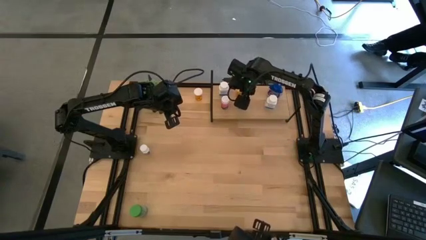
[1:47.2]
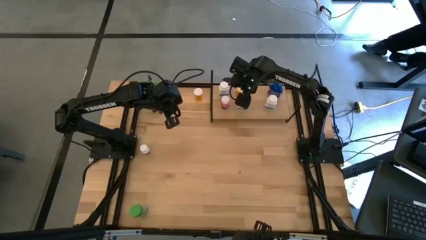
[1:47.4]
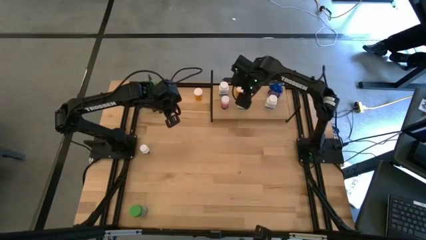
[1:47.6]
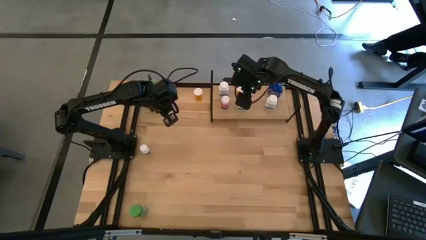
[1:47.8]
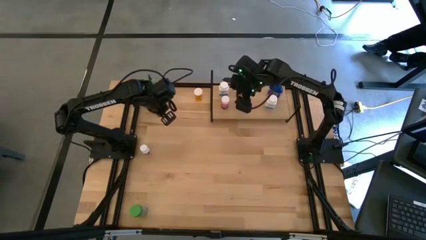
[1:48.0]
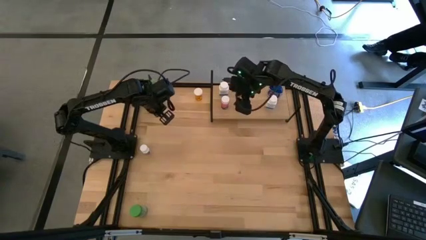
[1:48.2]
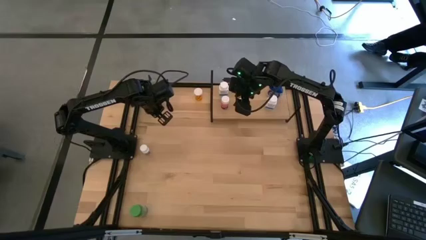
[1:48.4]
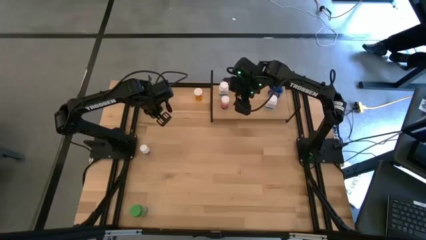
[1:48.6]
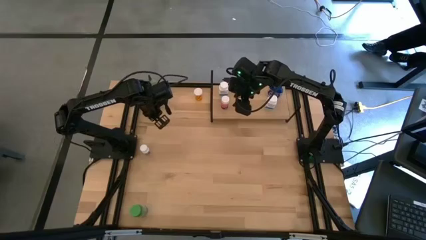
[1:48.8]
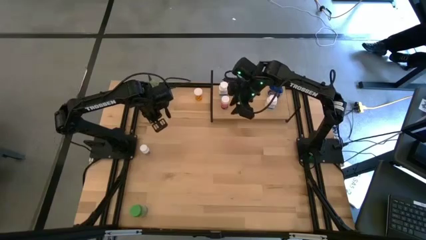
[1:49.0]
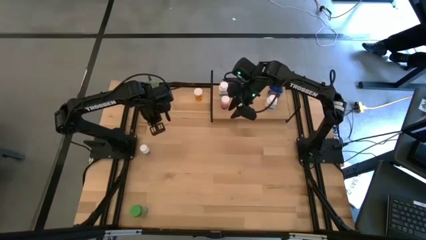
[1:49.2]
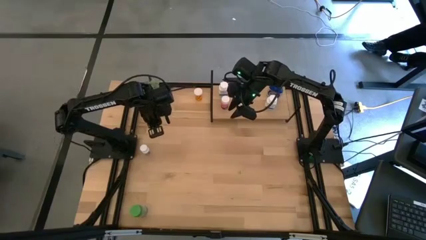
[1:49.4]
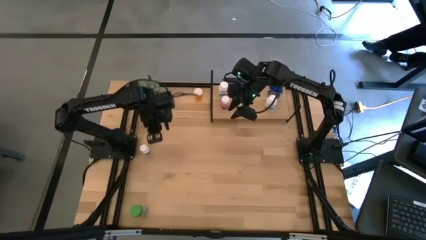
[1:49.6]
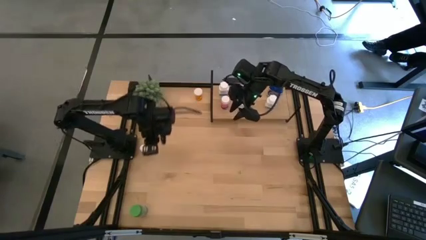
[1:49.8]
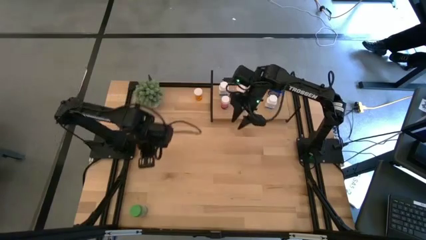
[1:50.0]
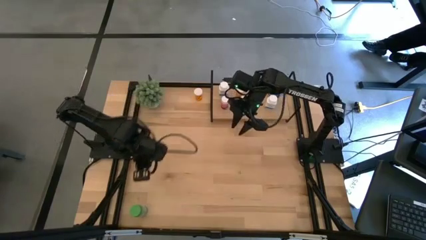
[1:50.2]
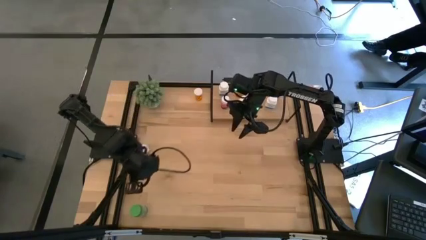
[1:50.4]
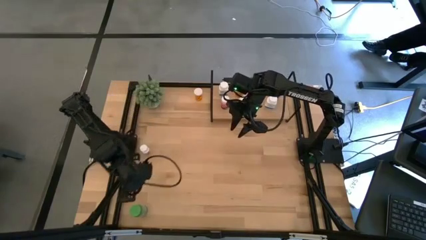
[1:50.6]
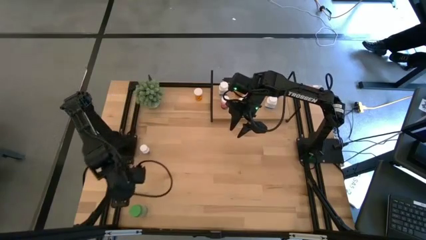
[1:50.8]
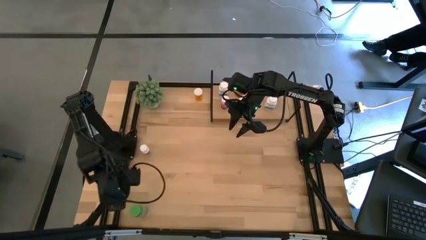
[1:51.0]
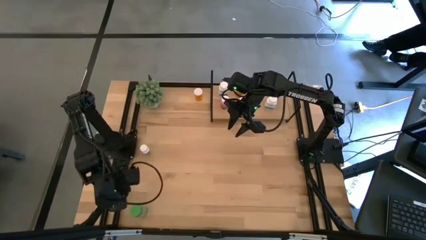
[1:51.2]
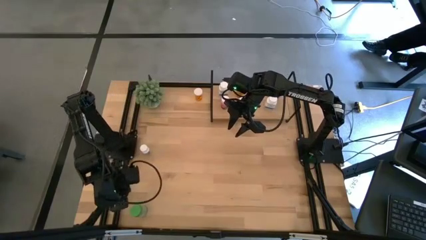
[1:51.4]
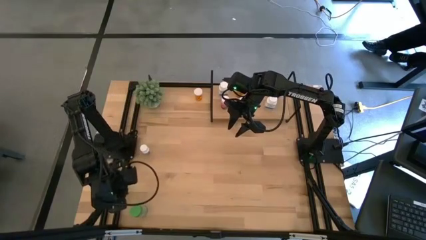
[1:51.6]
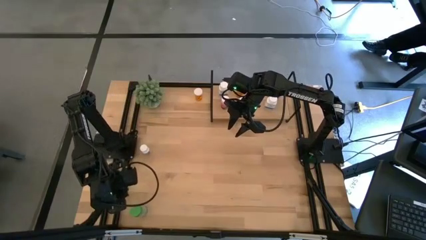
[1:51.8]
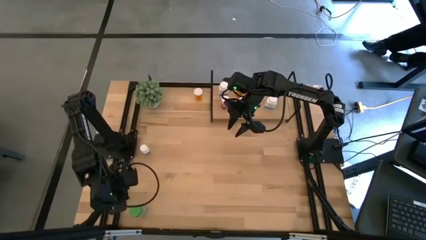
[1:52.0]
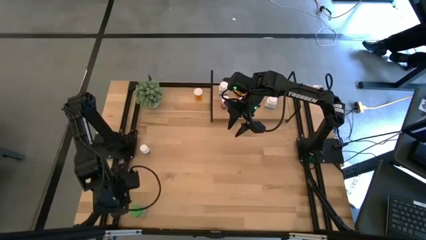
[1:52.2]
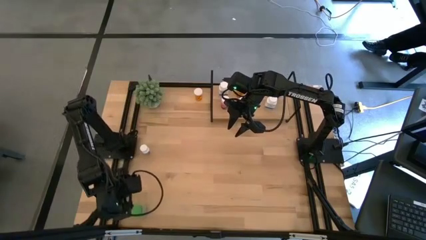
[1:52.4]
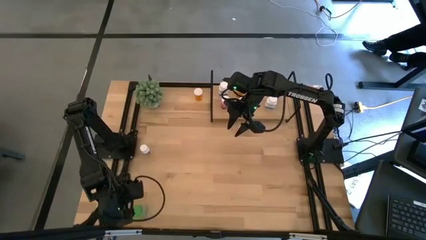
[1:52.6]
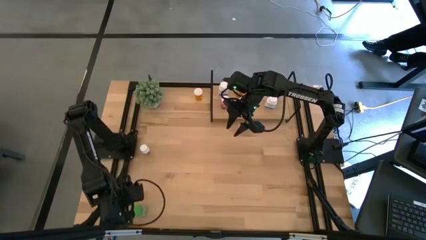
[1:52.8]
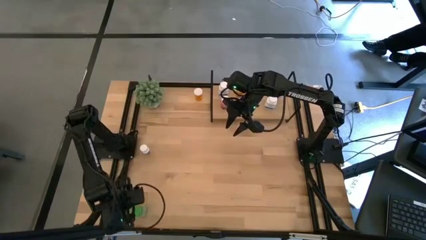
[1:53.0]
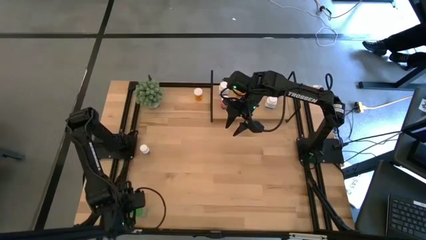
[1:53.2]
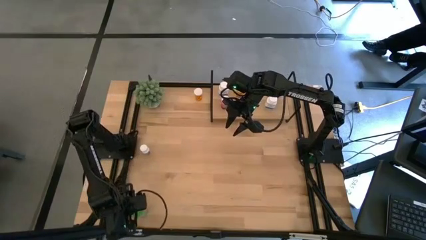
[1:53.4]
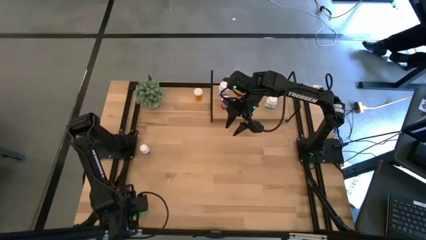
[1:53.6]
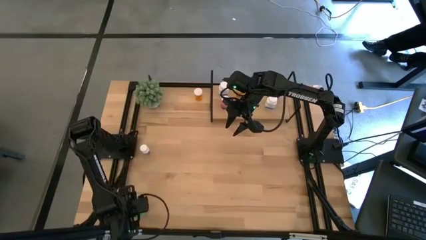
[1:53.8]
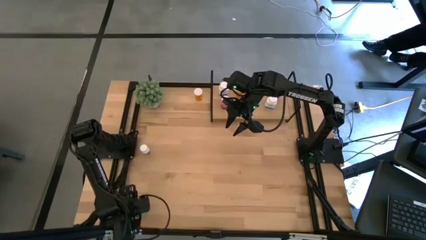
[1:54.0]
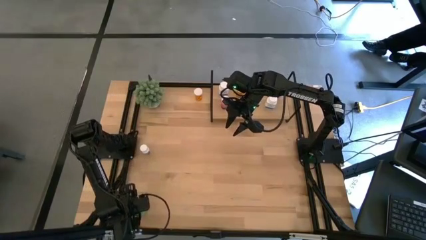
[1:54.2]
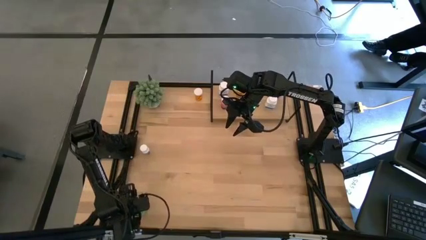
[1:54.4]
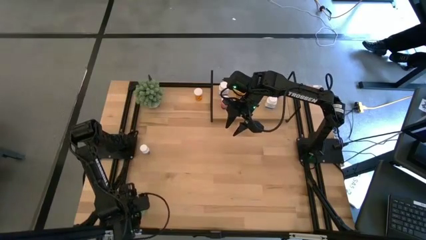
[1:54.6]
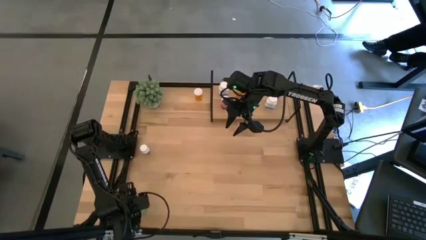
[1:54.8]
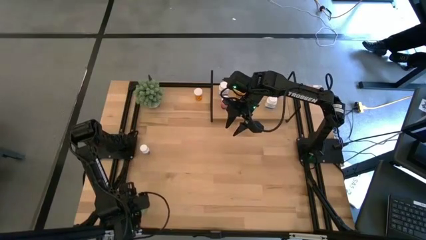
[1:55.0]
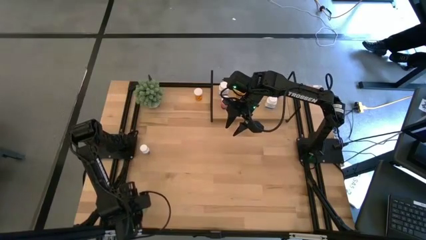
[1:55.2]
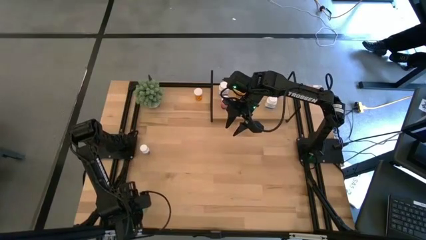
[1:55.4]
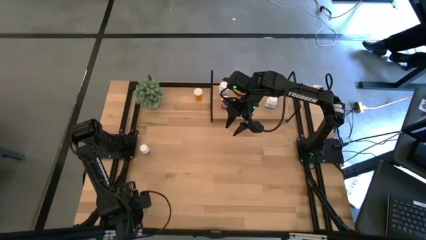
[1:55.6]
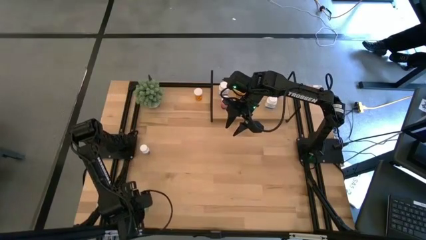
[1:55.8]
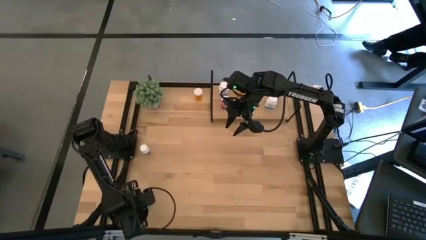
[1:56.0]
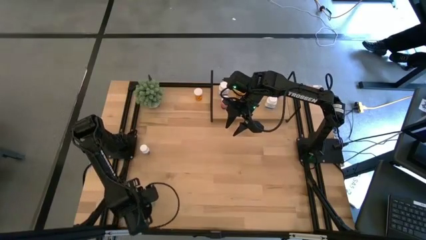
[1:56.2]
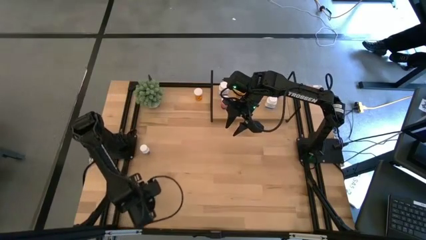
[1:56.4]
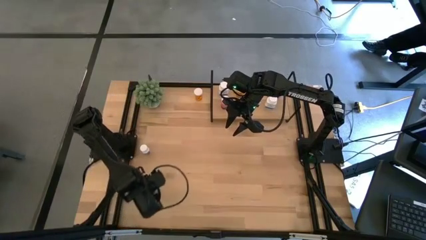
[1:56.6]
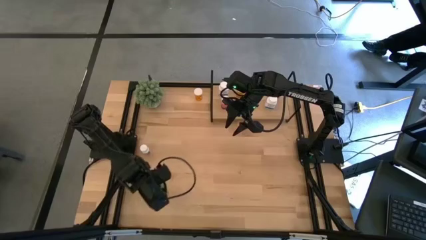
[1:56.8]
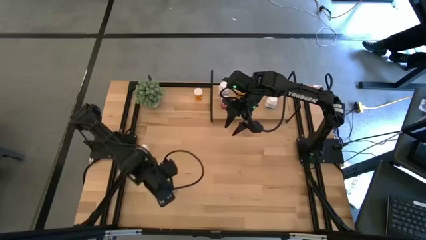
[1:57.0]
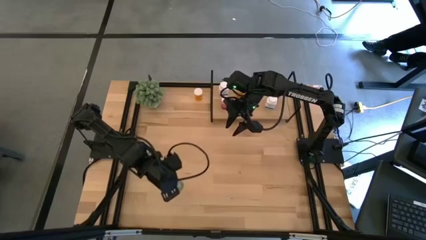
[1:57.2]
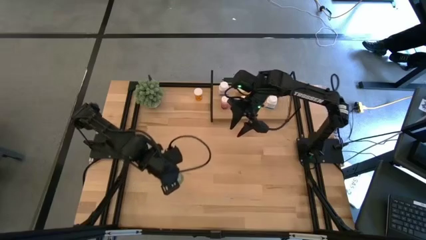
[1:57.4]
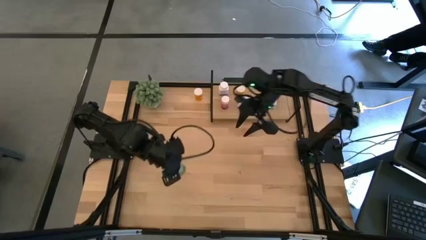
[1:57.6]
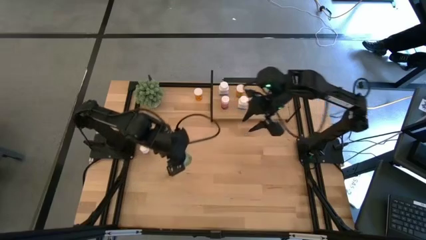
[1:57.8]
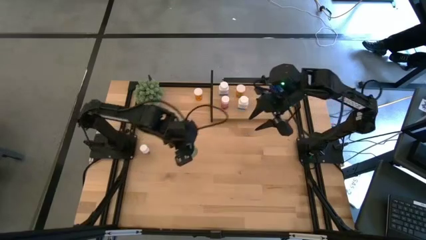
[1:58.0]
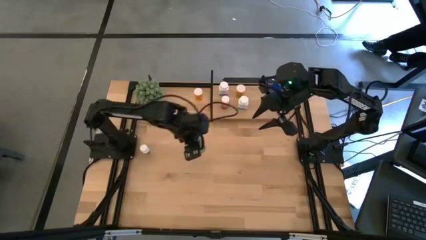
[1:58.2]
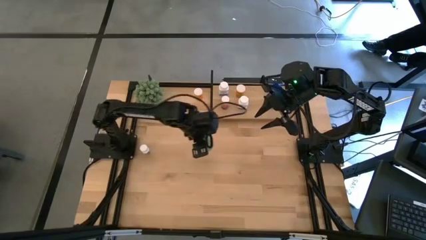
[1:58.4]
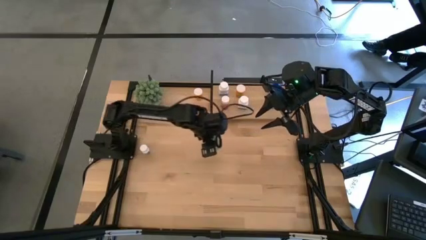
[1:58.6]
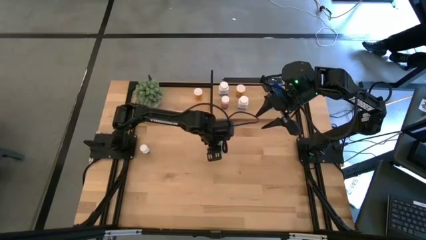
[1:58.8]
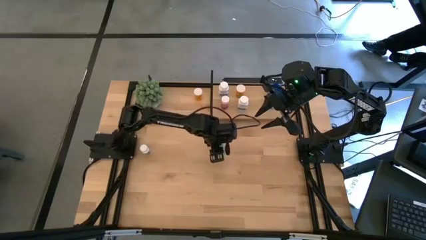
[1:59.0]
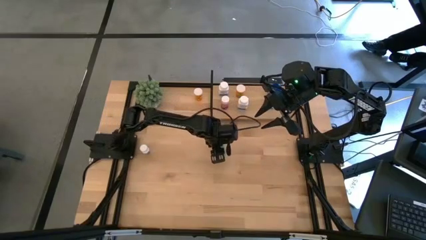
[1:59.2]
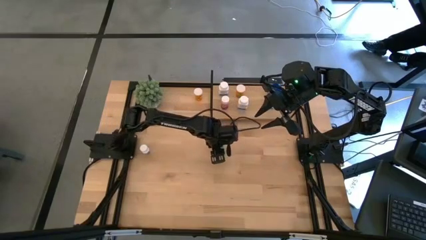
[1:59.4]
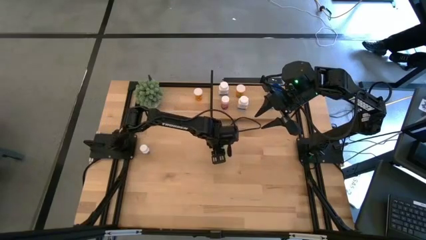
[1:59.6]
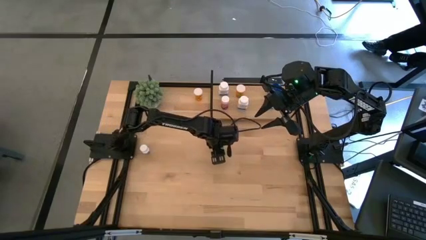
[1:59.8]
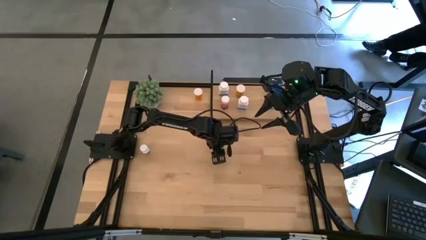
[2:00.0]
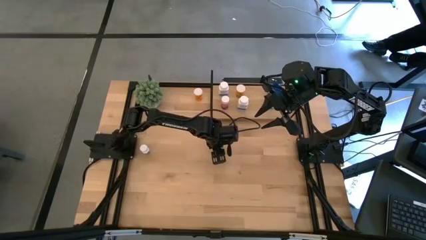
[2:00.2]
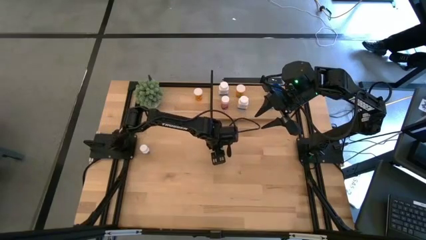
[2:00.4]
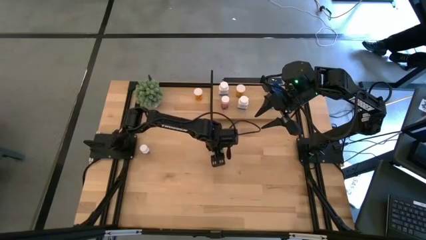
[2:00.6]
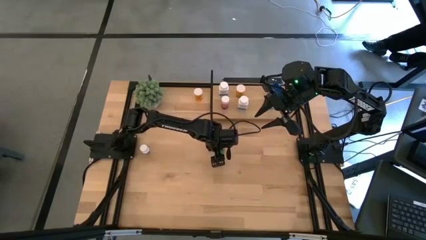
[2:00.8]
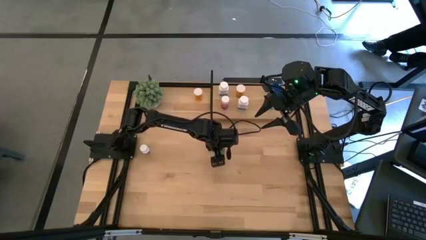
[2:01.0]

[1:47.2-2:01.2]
Task: Pick and place medicine bottles onto shelf by color
Put the green medicine bottle on the shelf
